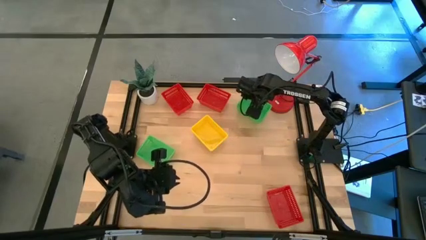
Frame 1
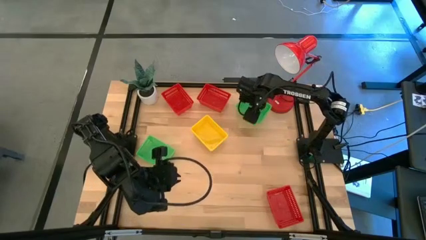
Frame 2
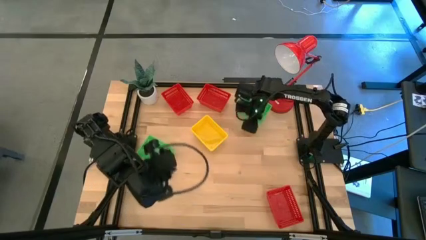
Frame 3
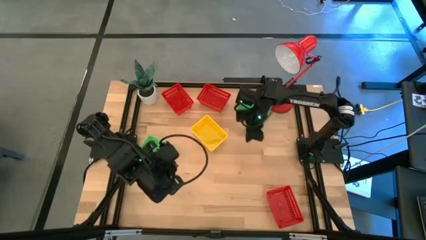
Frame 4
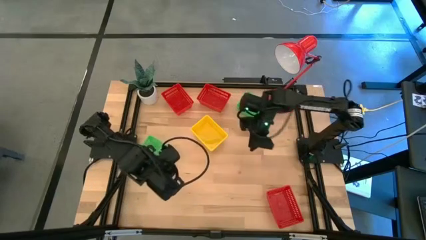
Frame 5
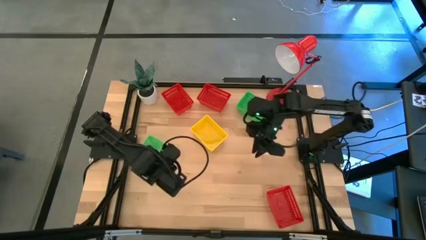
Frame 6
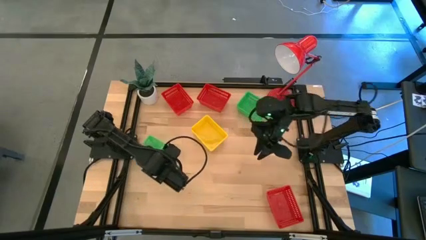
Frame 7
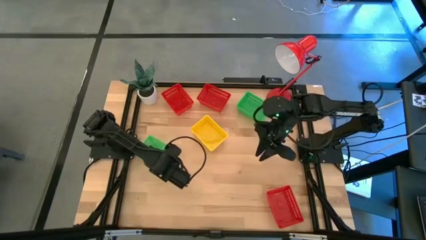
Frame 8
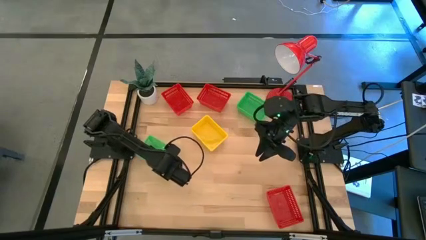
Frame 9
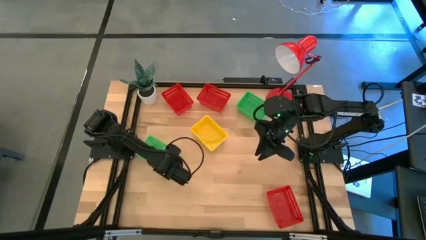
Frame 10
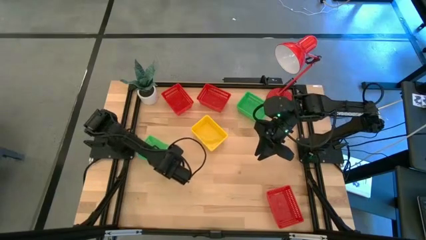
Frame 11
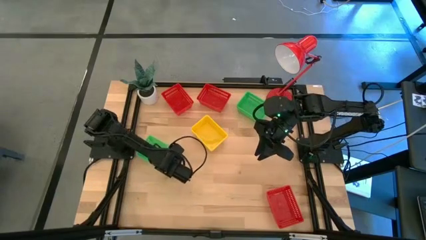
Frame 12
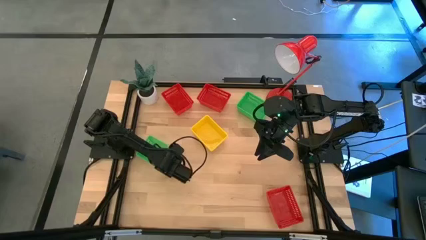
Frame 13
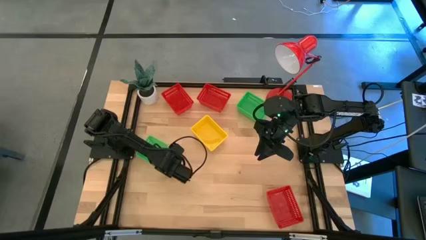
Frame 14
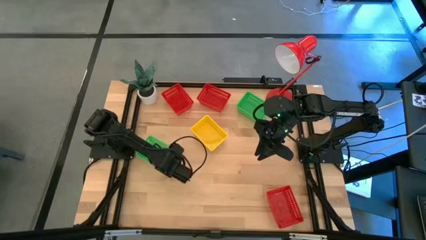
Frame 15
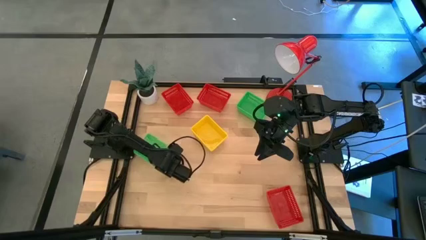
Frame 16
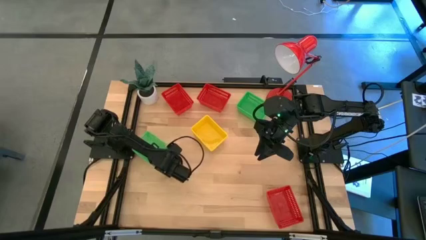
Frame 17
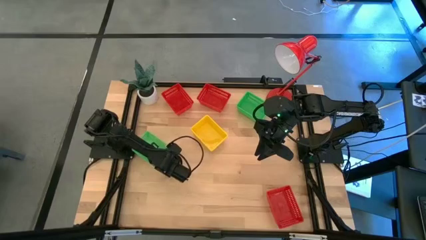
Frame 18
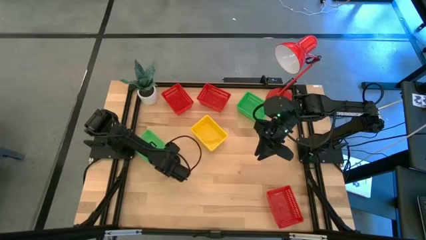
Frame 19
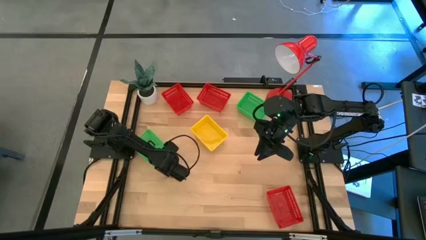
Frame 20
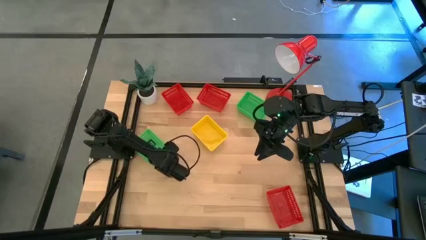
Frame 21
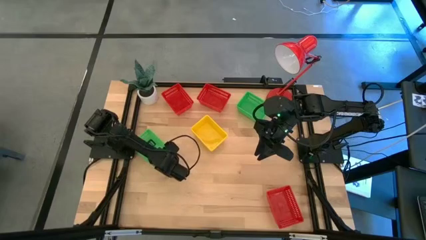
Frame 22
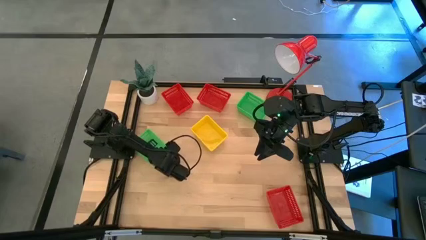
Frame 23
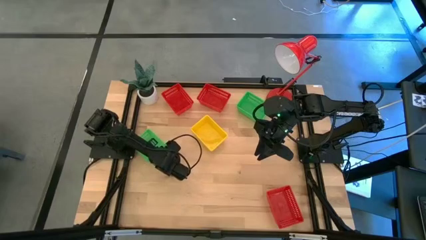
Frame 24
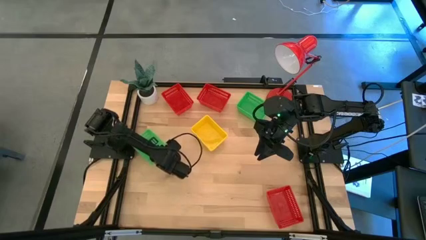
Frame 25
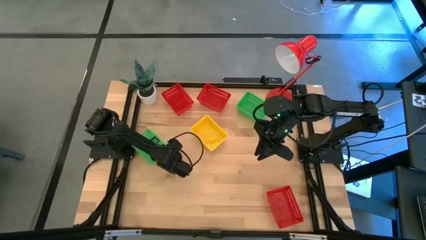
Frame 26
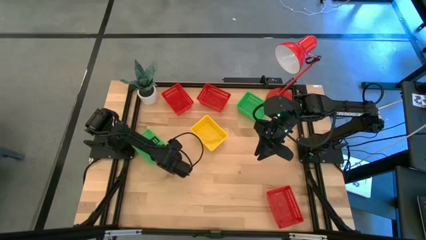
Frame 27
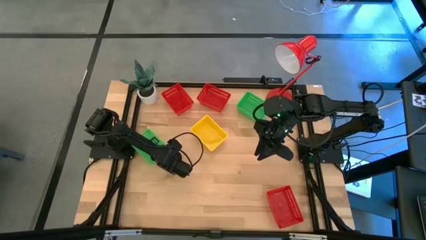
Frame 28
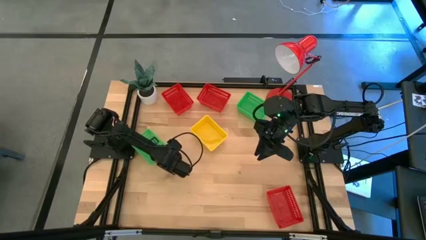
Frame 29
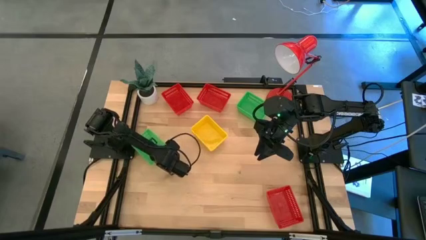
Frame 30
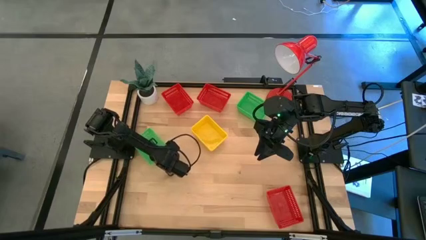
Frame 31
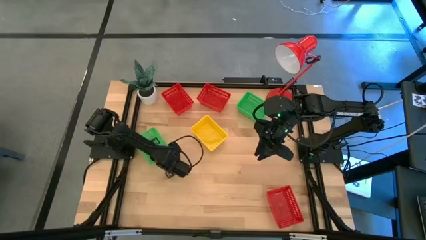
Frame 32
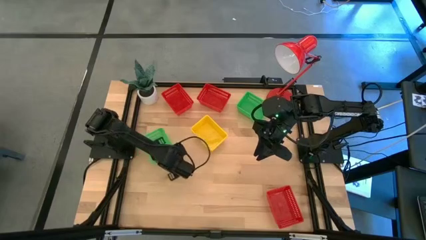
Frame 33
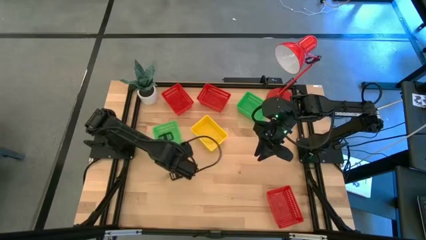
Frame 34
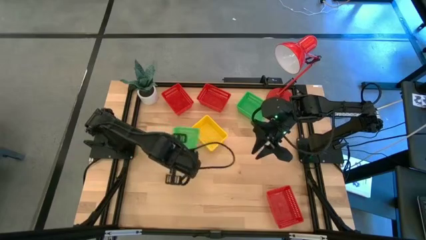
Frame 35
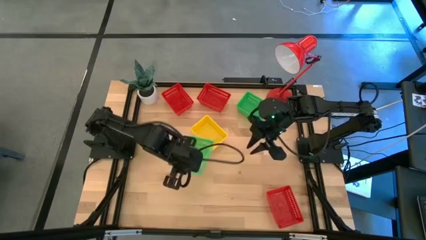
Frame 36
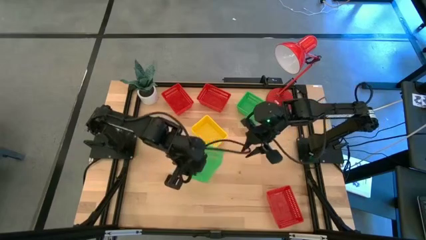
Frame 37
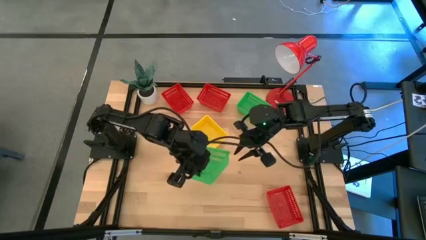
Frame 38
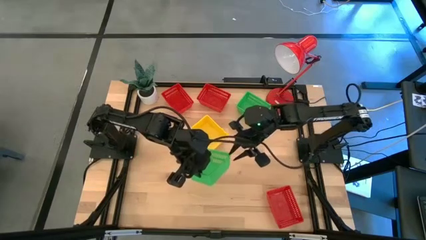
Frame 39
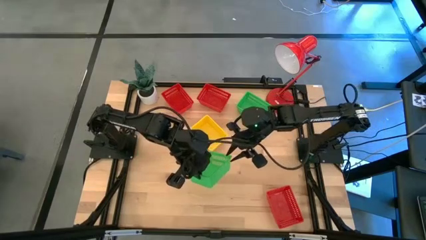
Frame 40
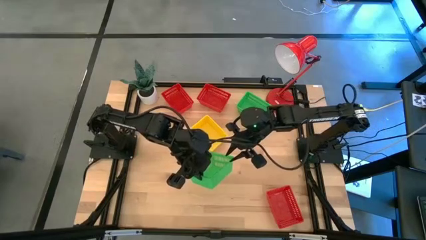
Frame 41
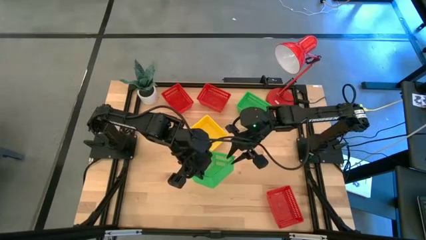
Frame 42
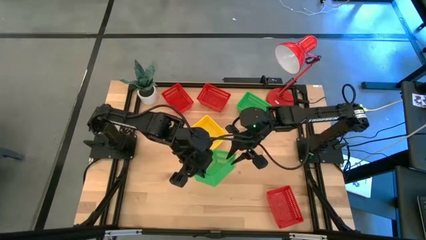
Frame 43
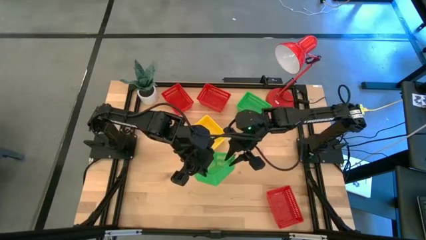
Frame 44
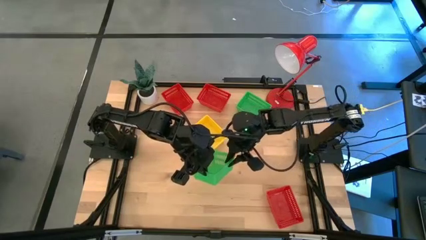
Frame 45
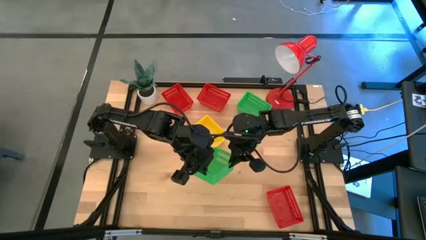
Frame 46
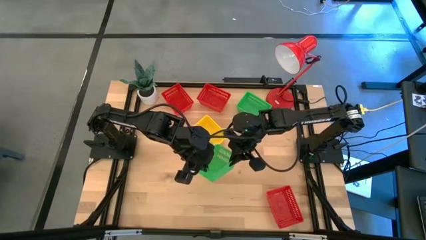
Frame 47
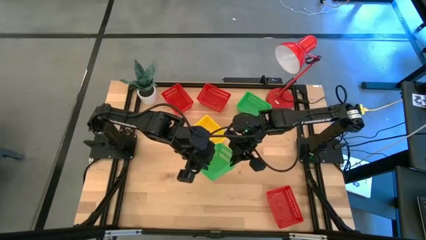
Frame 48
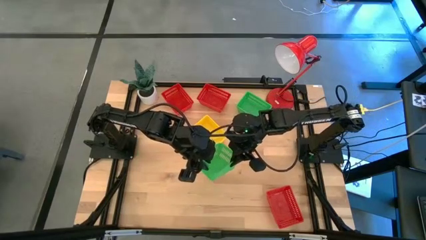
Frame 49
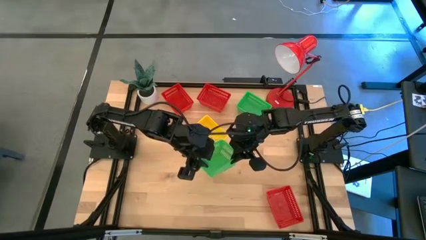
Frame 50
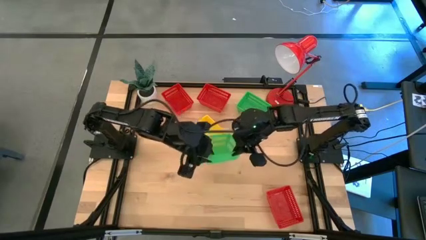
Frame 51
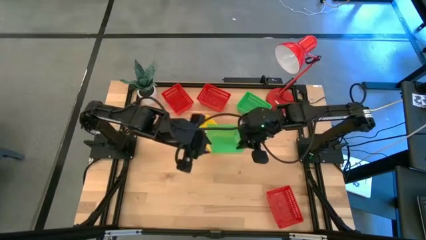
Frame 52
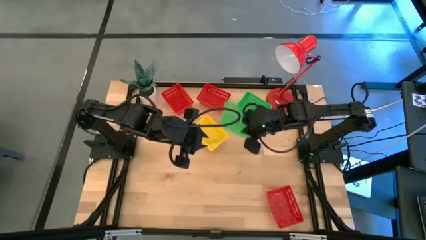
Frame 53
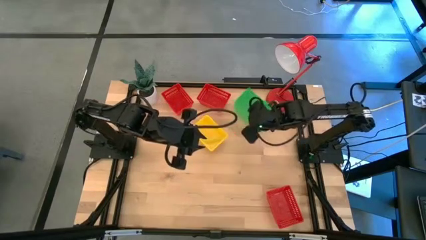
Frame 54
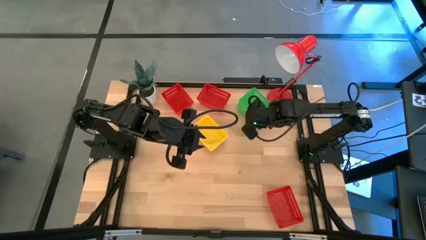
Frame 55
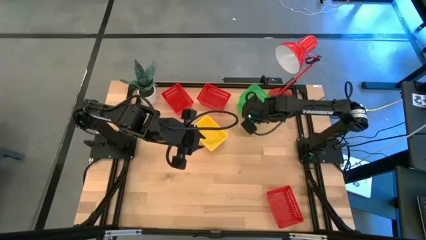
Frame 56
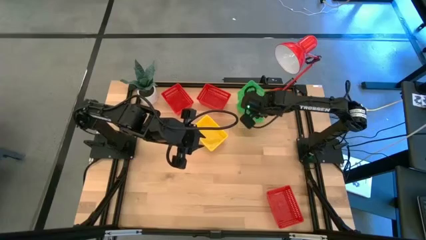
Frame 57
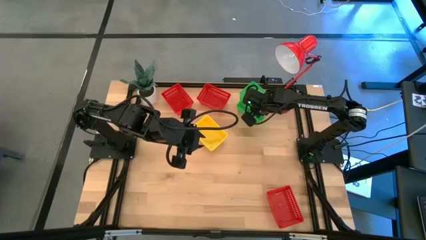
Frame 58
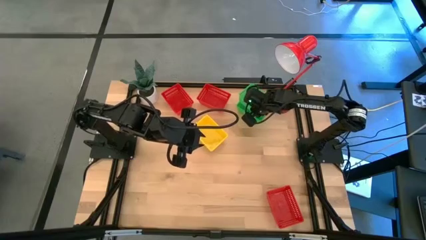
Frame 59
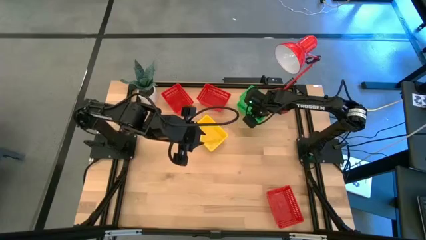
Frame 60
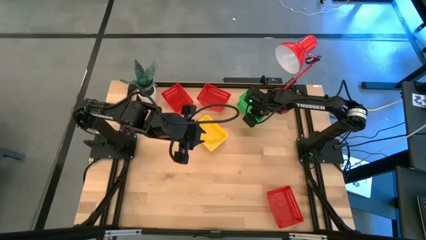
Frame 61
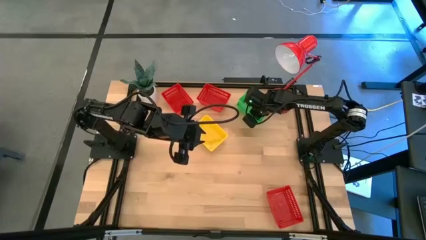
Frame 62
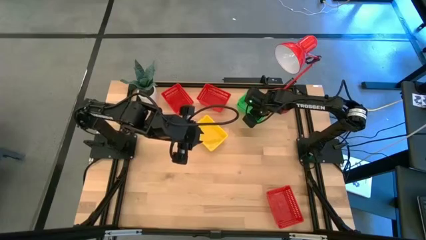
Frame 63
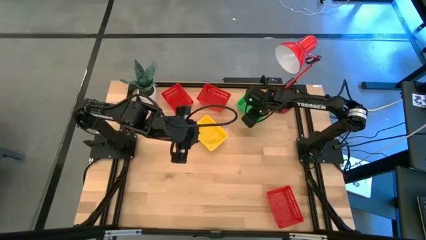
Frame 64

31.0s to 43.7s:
Stack the green bin on the green bin

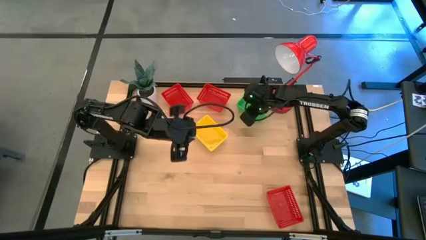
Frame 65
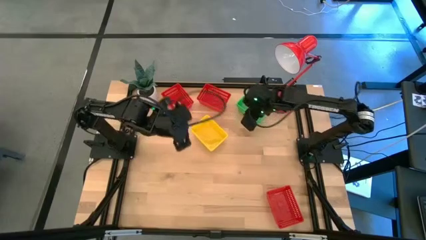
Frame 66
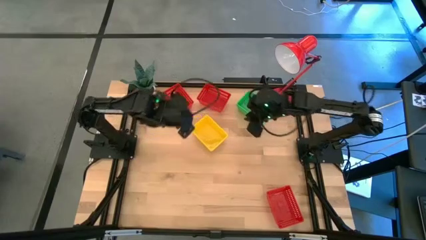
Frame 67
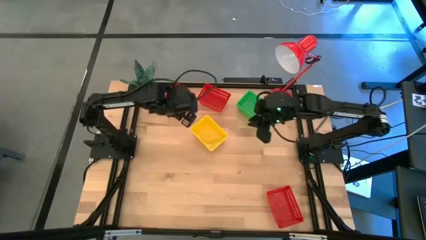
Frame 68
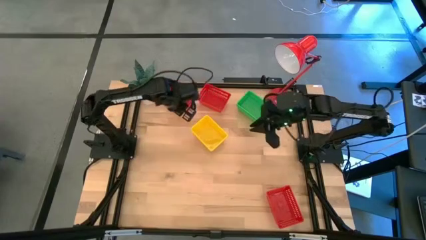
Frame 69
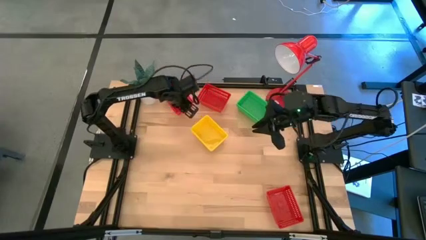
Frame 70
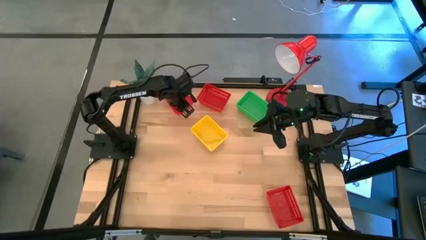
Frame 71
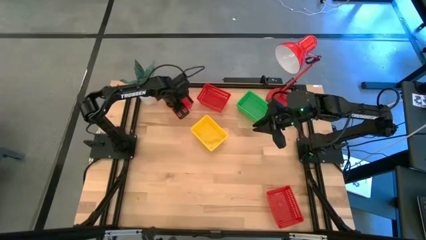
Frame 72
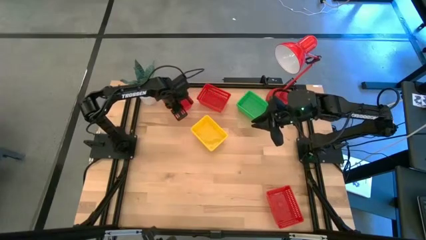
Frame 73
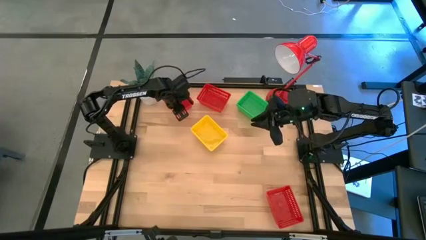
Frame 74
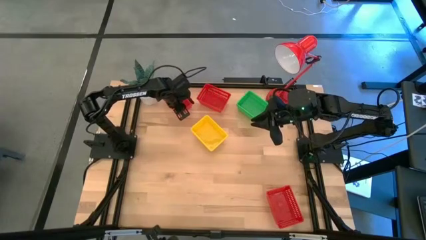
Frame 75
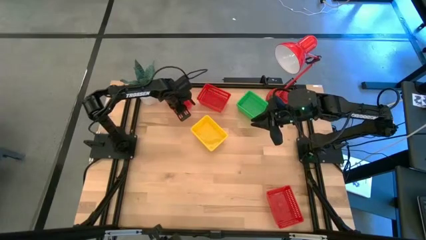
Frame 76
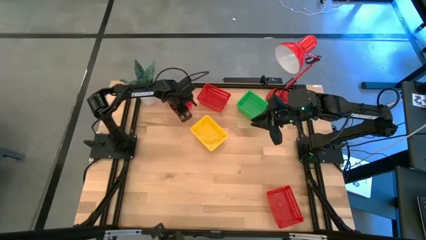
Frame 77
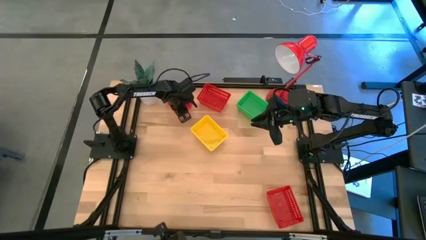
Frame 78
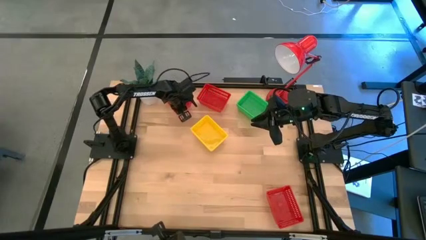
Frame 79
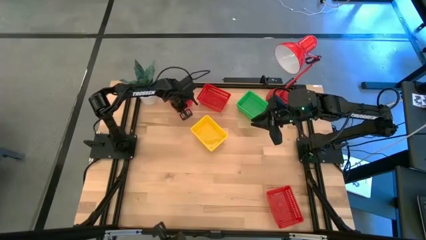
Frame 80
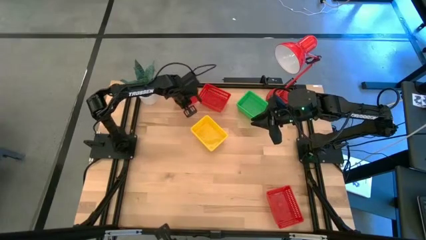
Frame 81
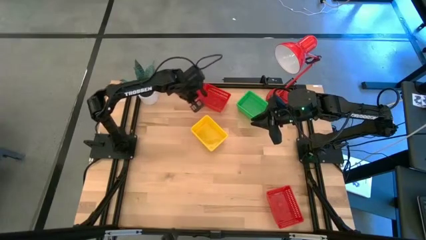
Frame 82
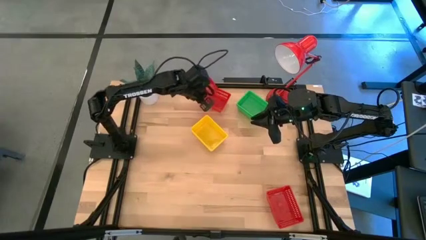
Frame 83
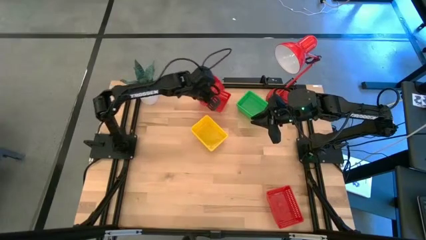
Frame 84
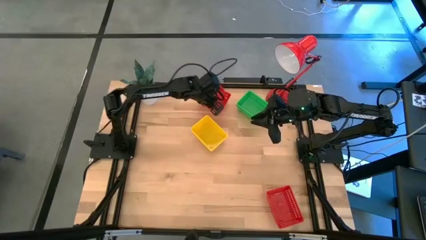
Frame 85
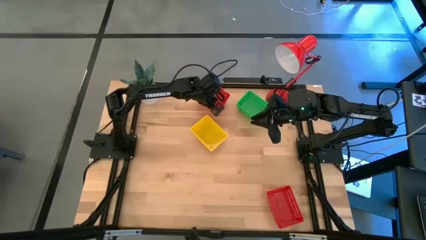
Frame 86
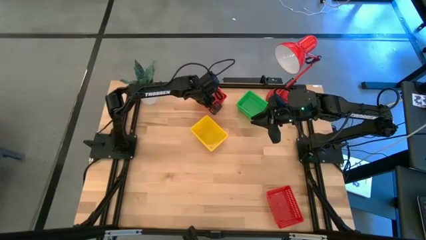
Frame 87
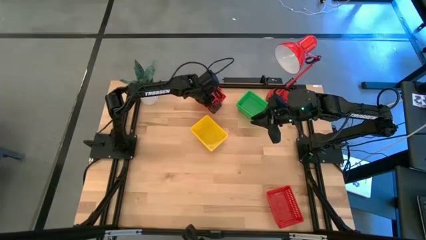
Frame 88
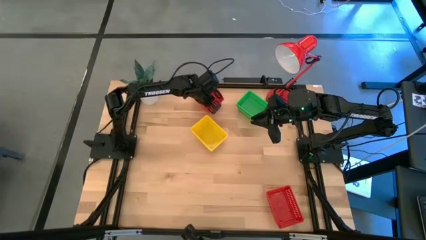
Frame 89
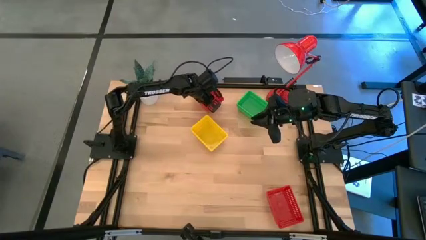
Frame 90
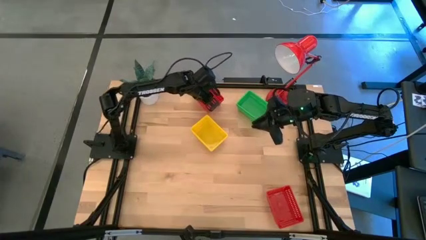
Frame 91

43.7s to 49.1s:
Stack the top red bin on the red bin
